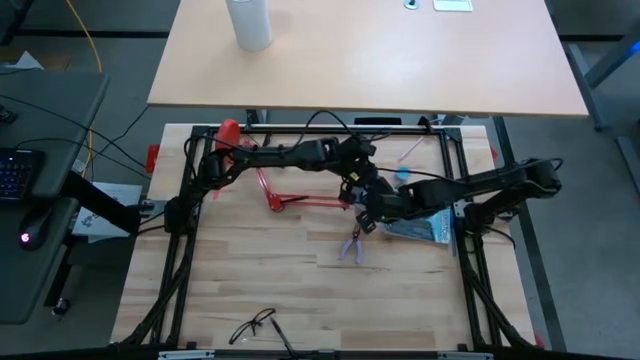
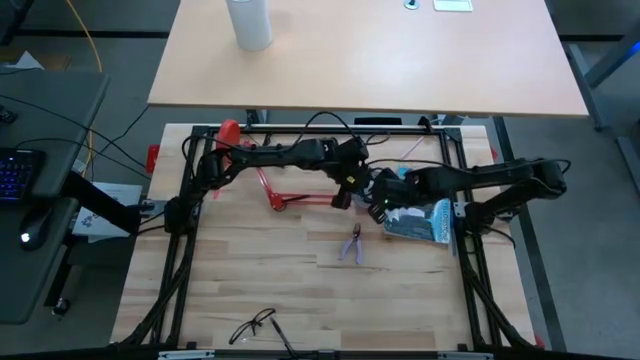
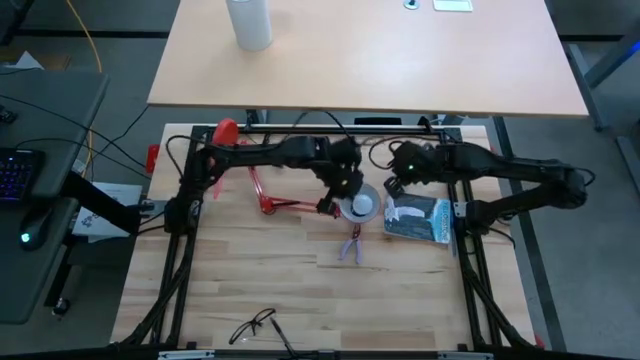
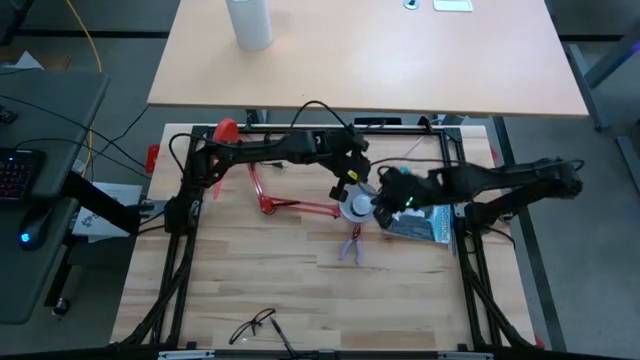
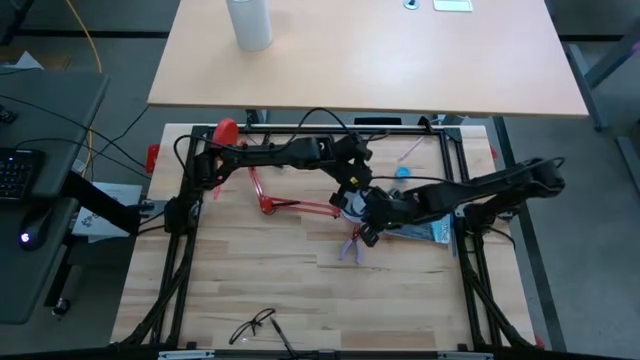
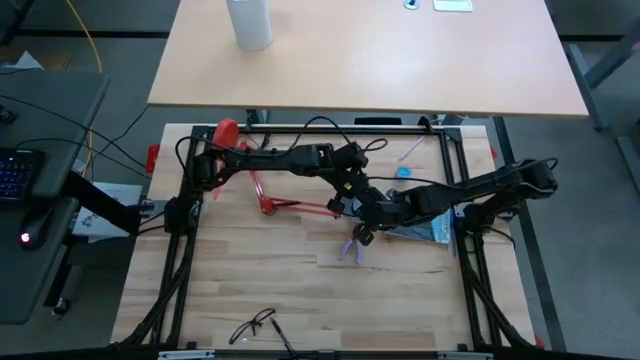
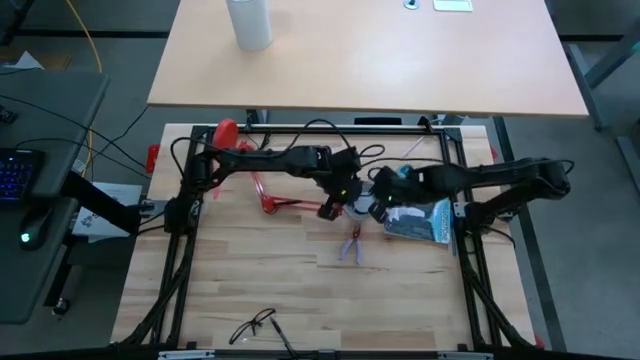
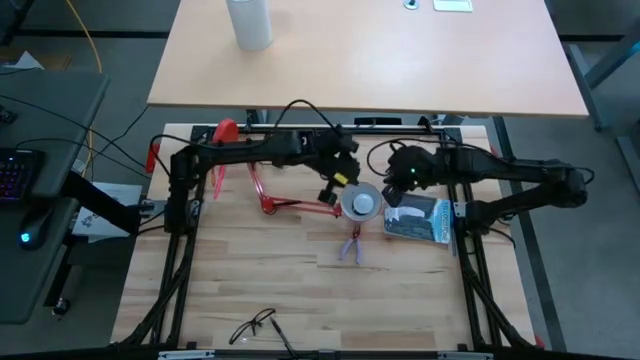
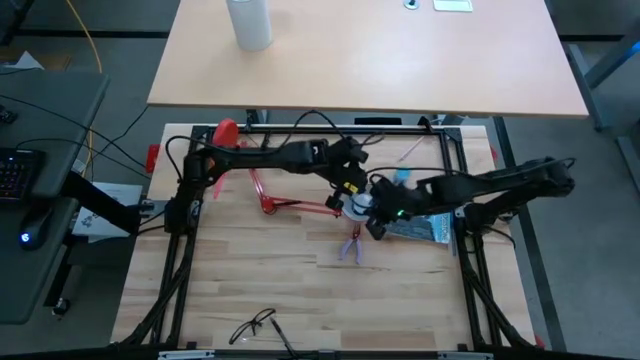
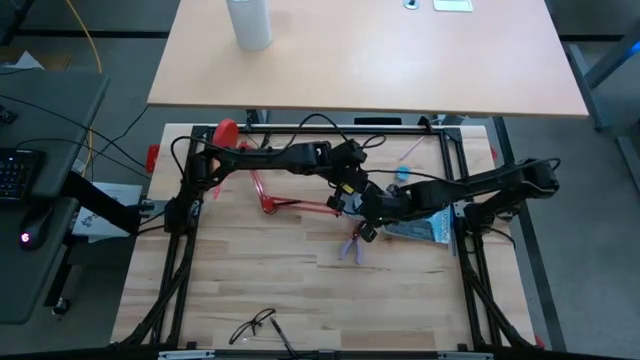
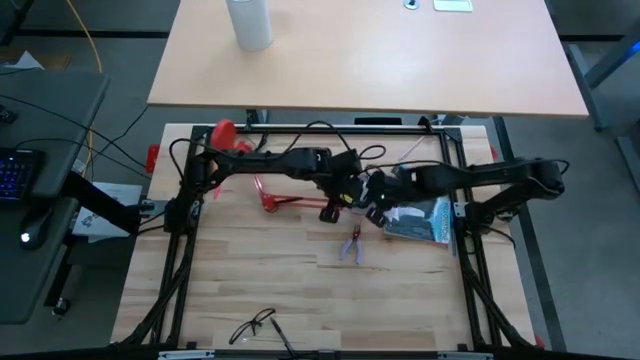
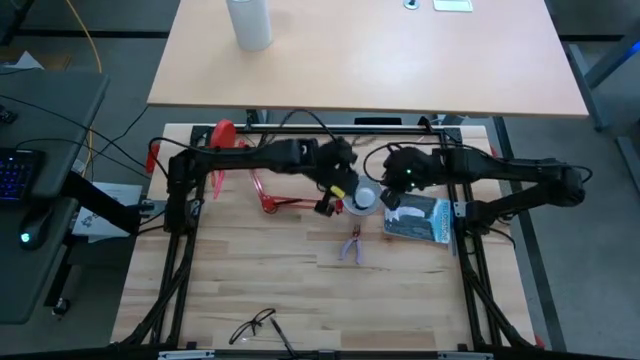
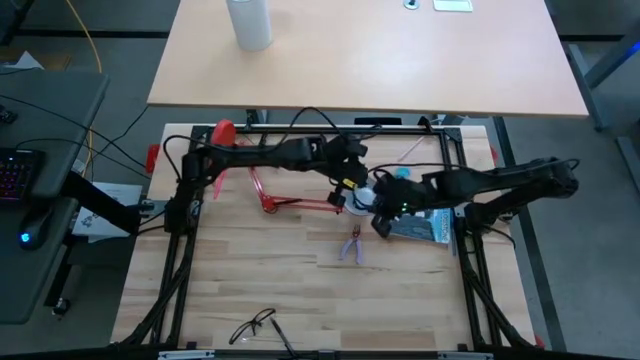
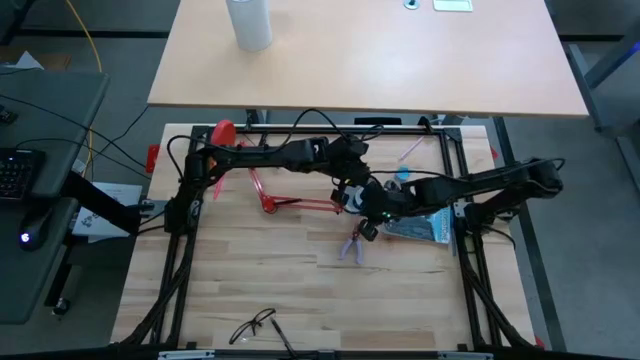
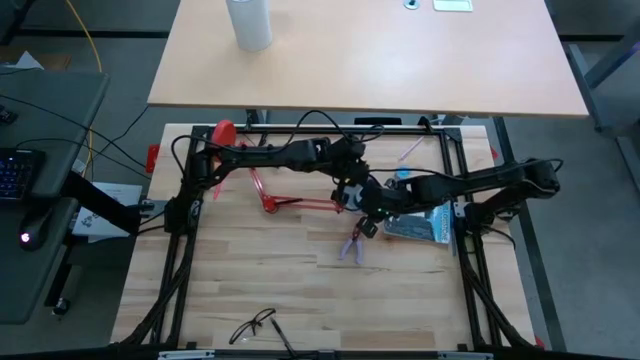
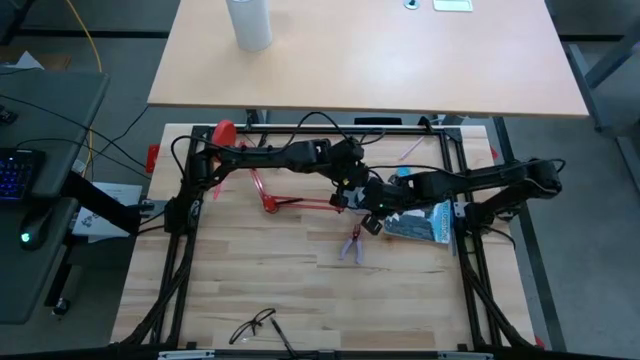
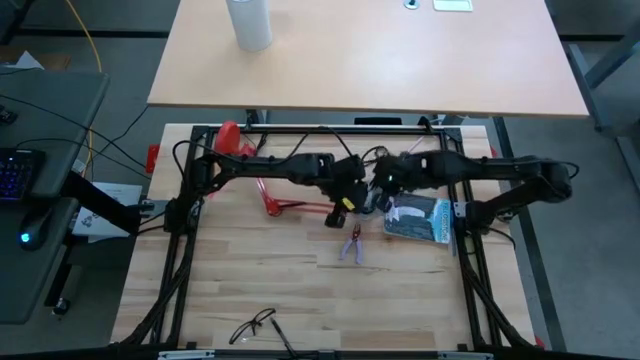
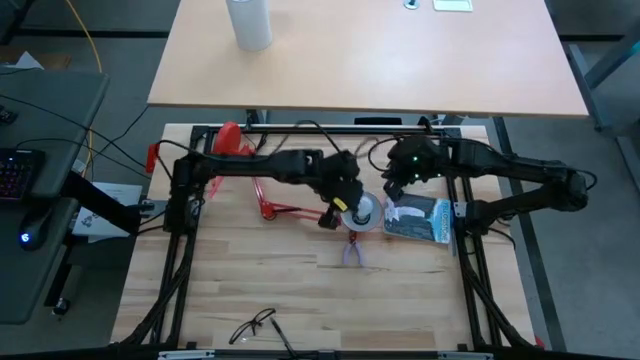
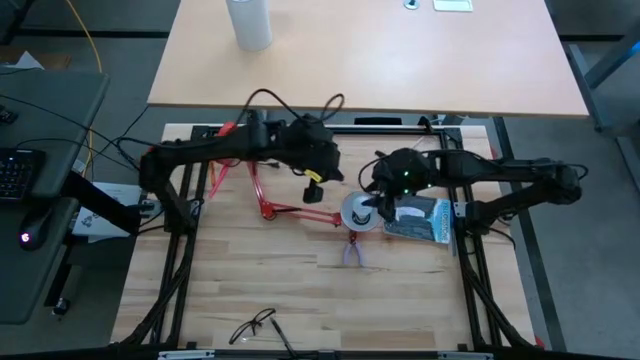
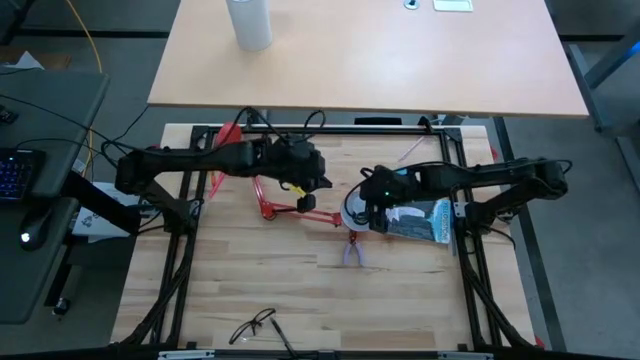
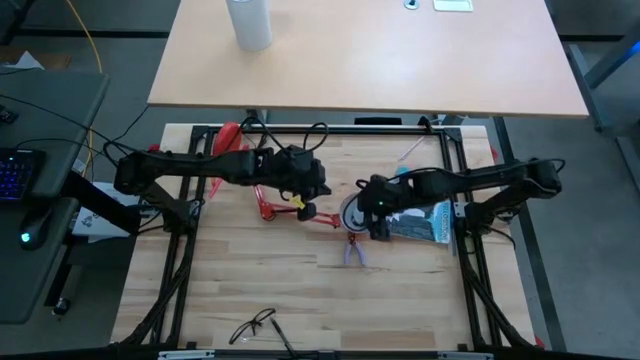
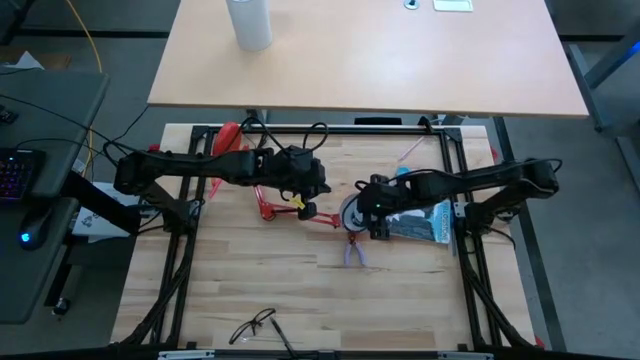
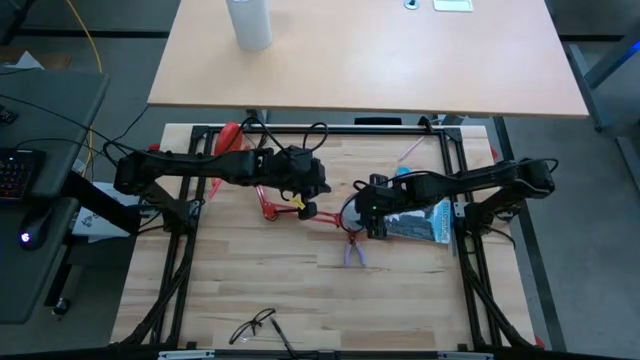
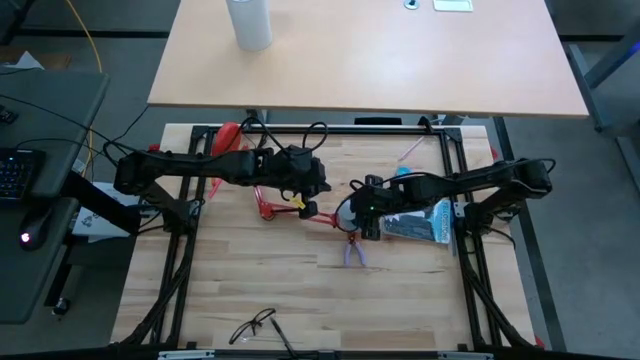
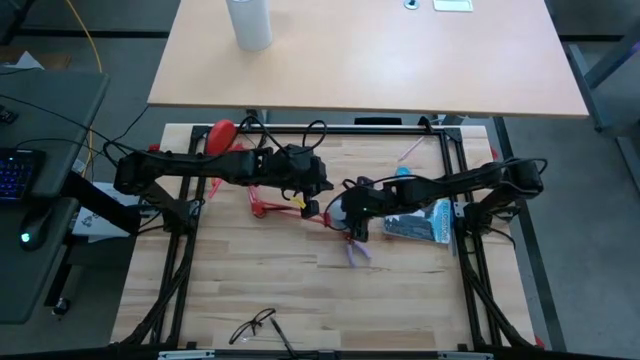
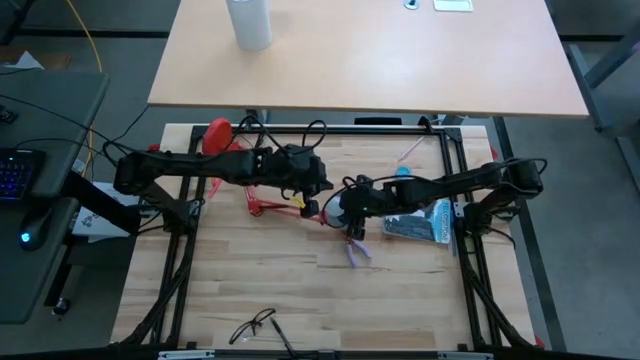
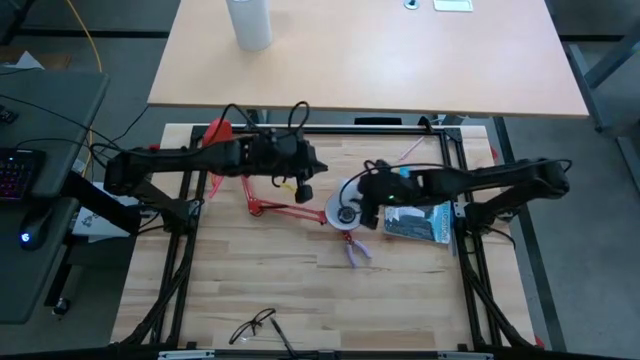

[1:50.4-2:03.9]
Task: Screw lightbulb
Remove the lightbulb from the lamp socket

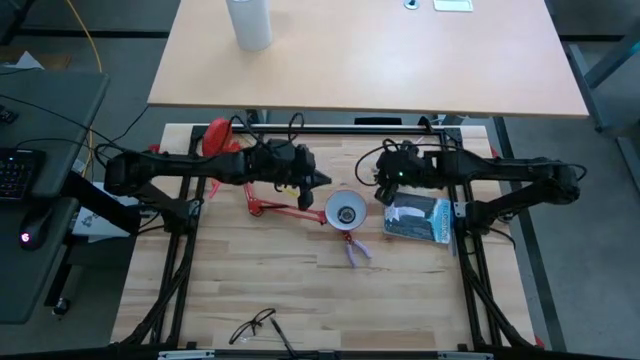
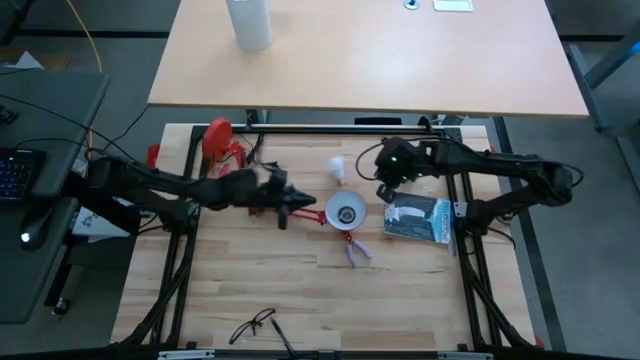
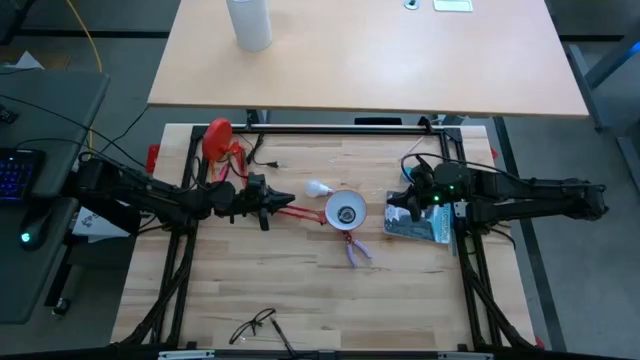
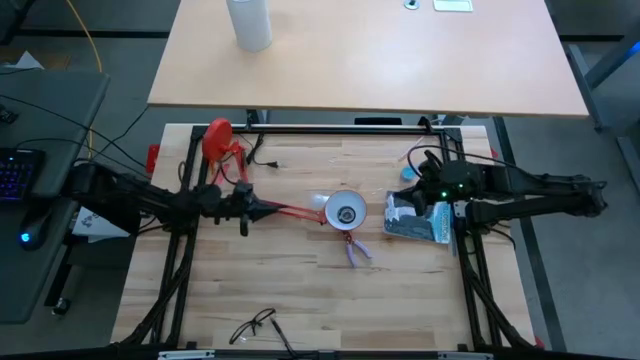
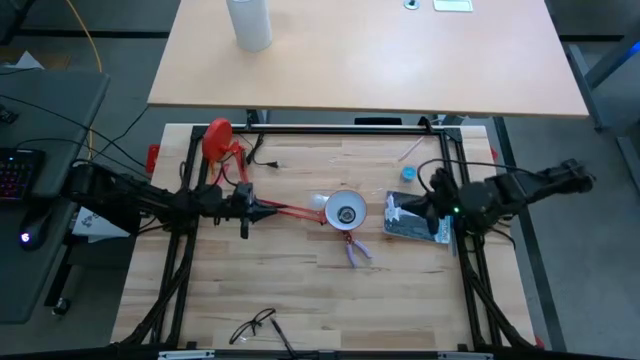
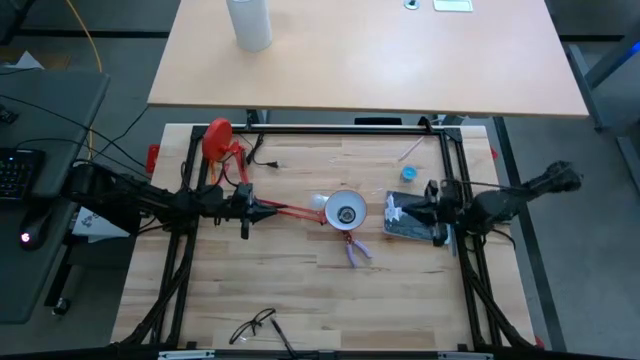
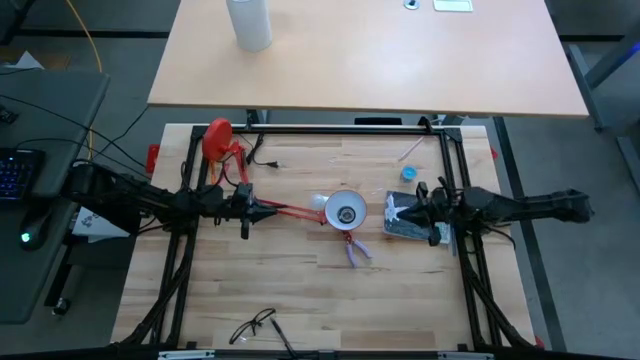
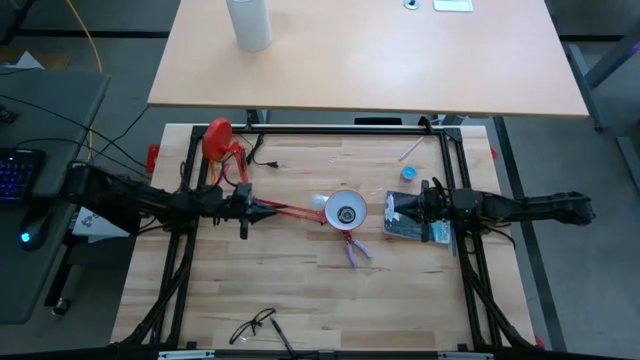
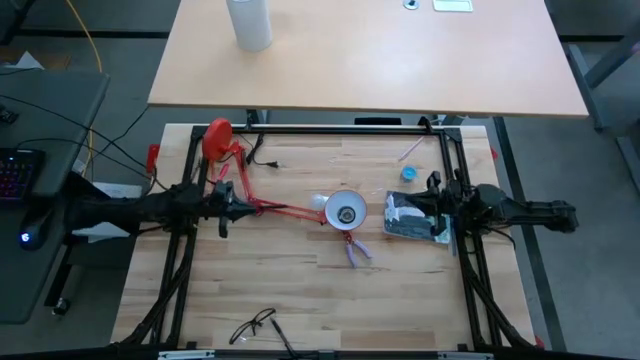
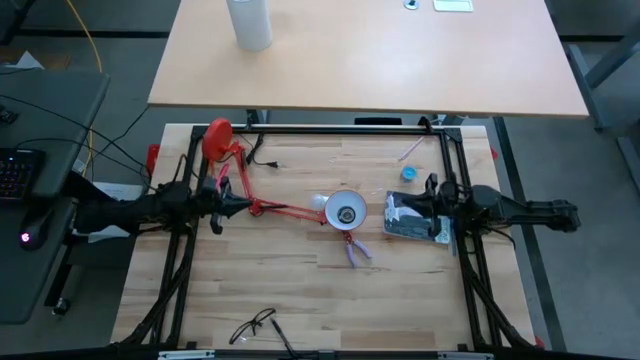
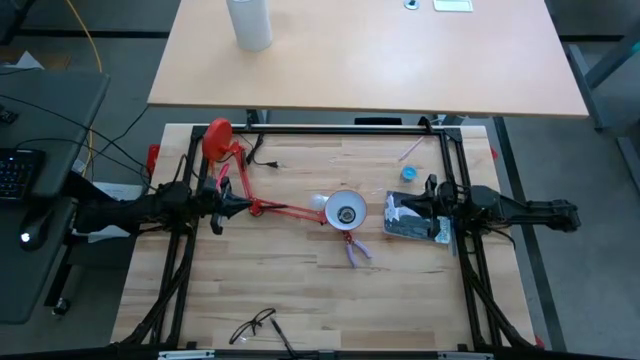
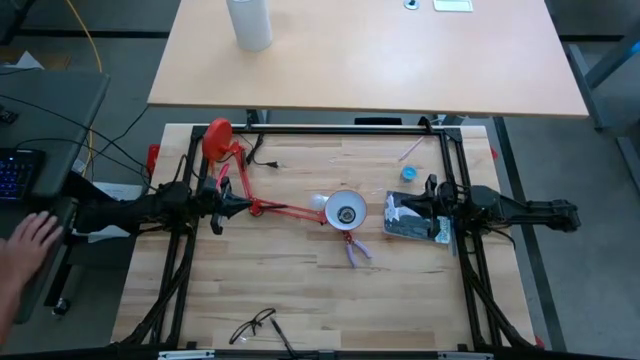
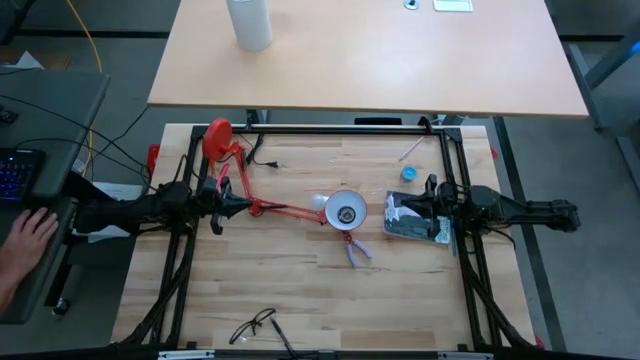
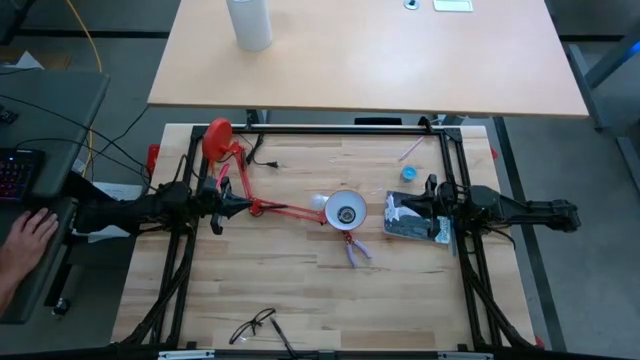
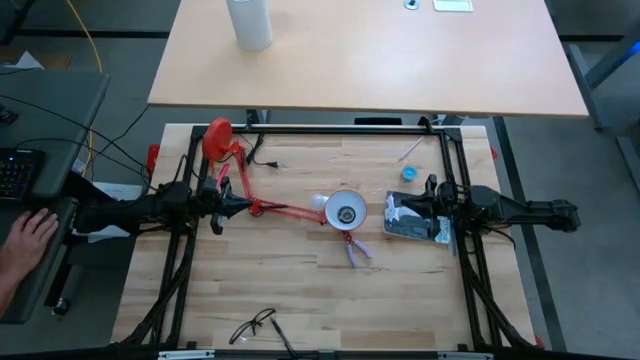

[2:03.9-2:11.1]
Return to Home Position
